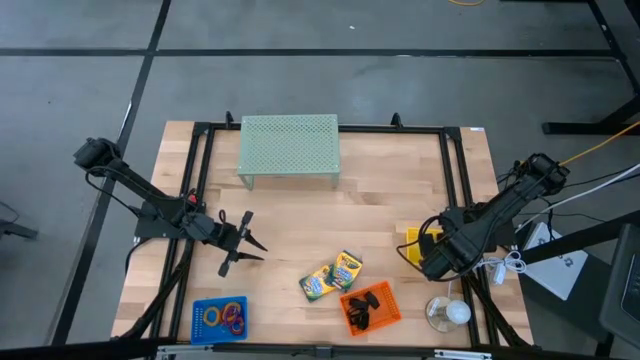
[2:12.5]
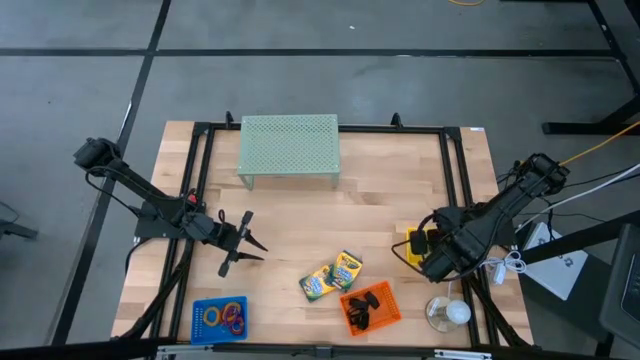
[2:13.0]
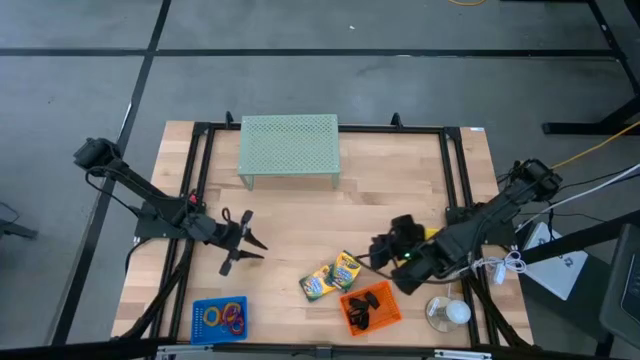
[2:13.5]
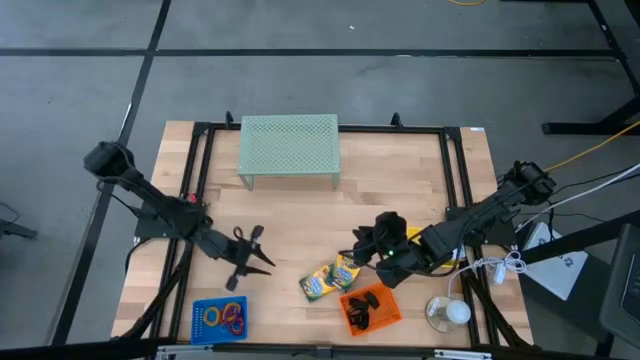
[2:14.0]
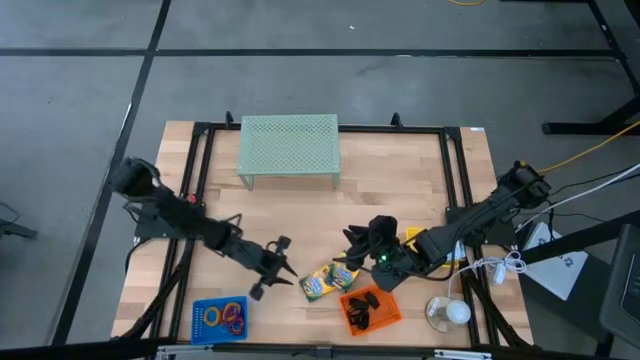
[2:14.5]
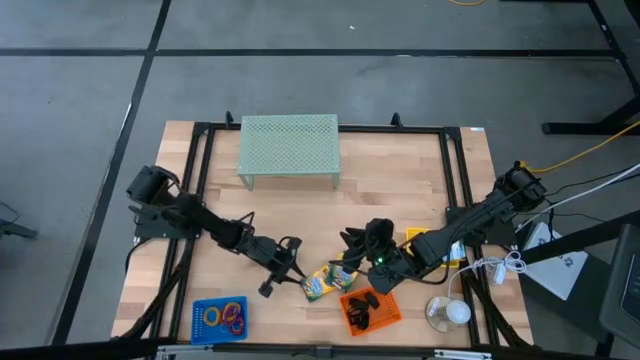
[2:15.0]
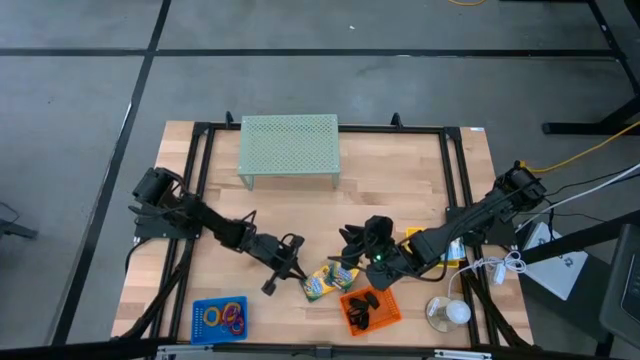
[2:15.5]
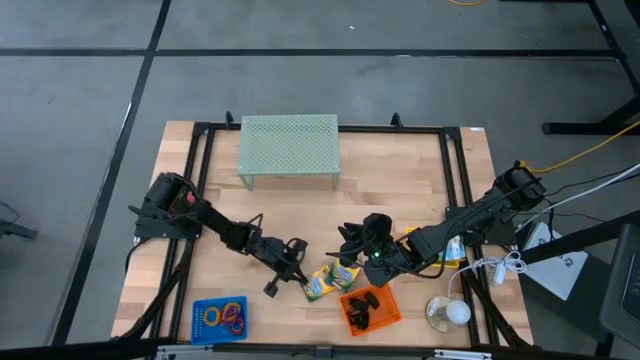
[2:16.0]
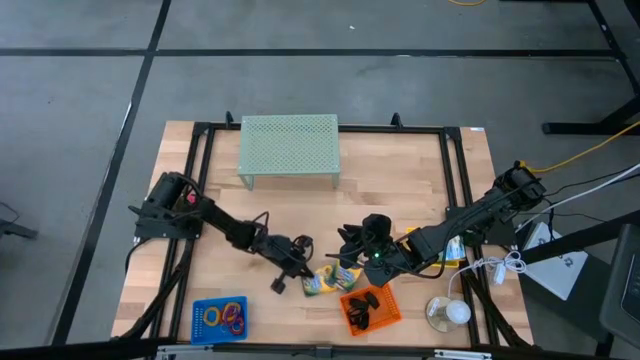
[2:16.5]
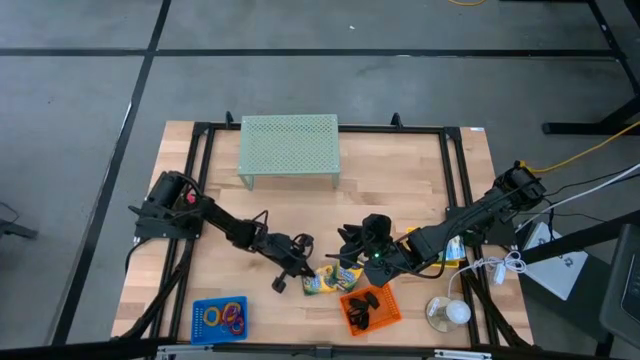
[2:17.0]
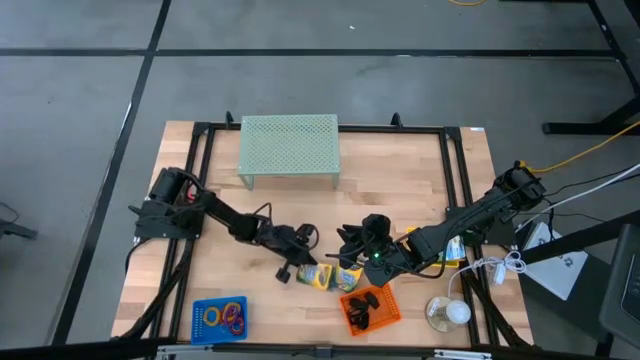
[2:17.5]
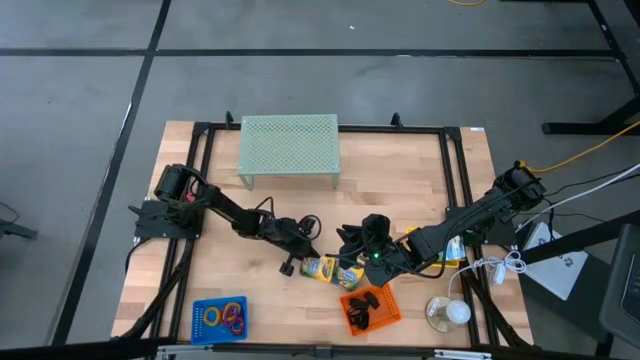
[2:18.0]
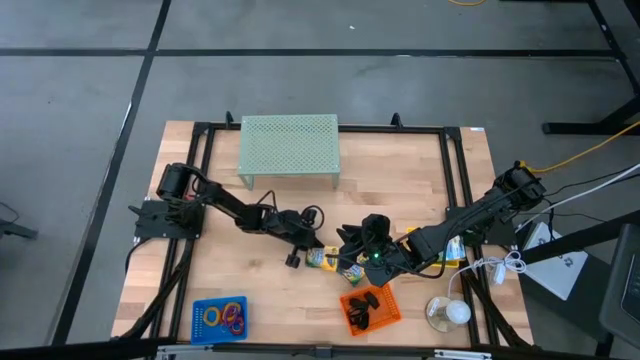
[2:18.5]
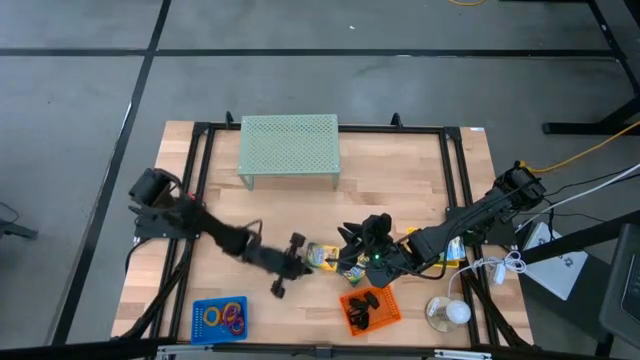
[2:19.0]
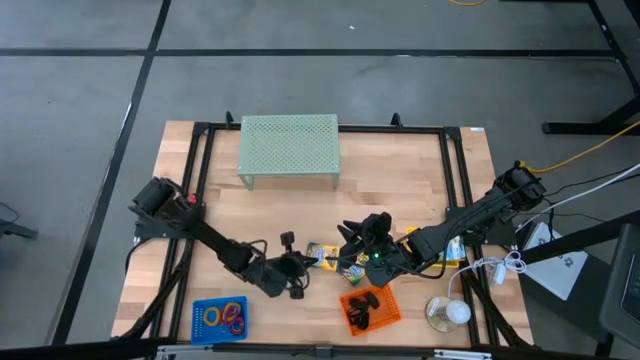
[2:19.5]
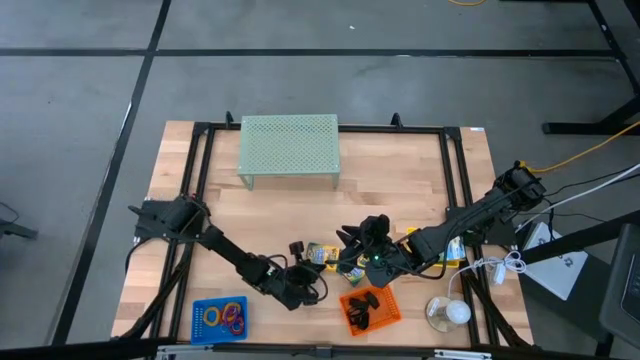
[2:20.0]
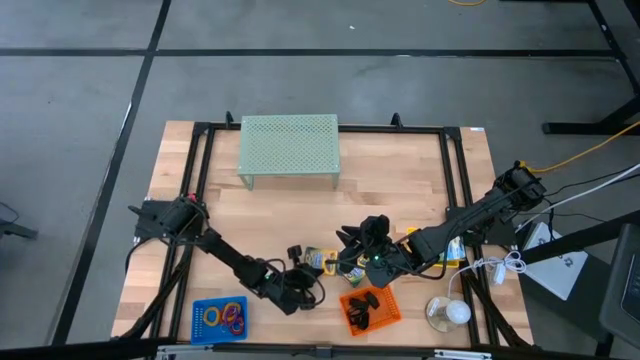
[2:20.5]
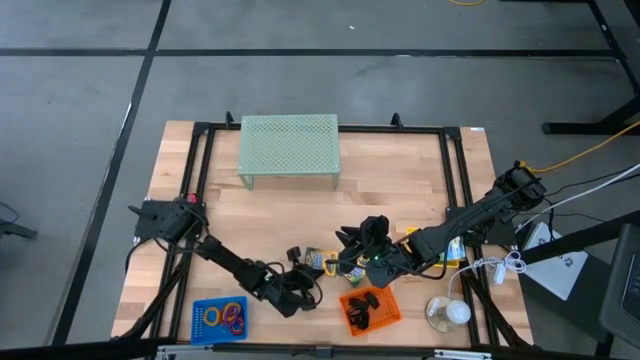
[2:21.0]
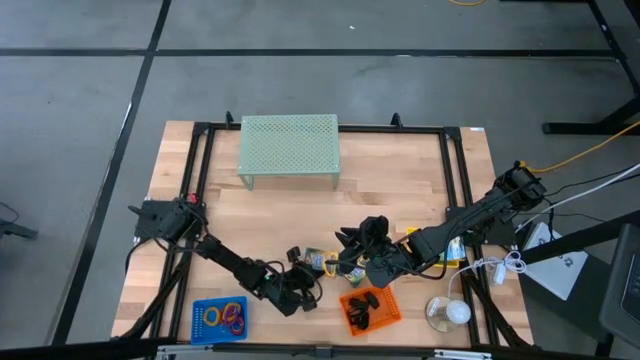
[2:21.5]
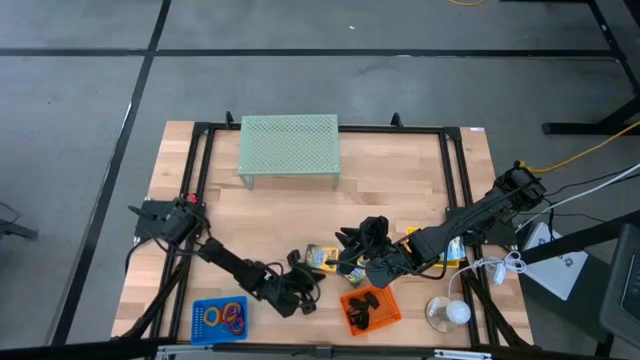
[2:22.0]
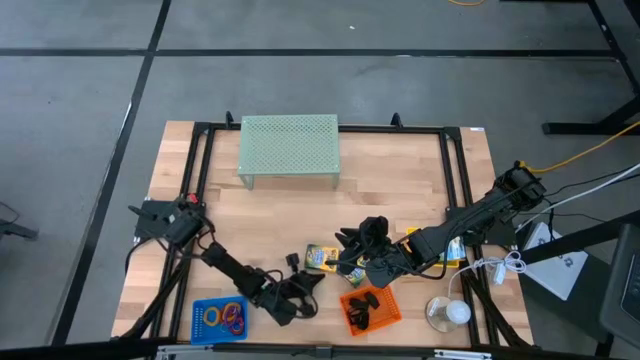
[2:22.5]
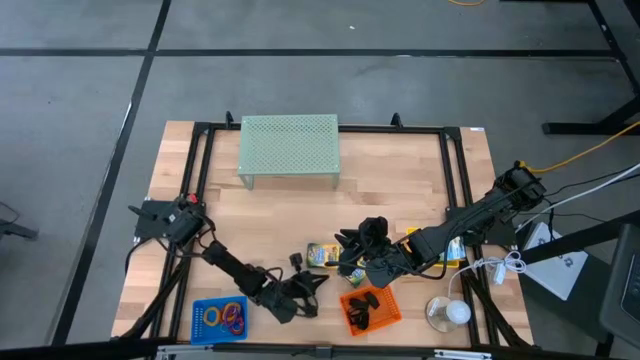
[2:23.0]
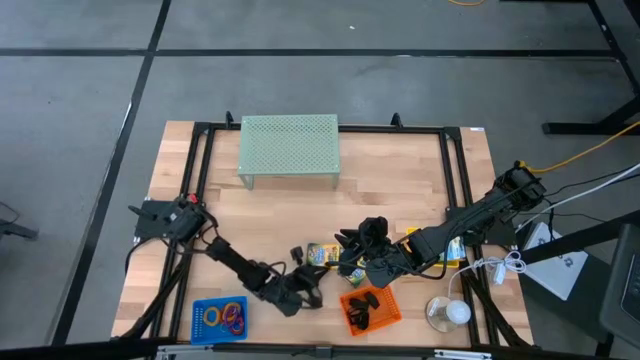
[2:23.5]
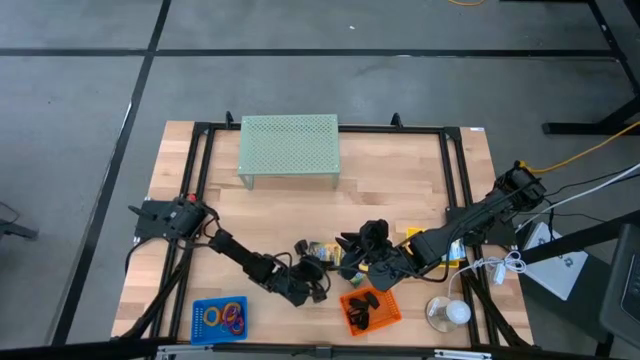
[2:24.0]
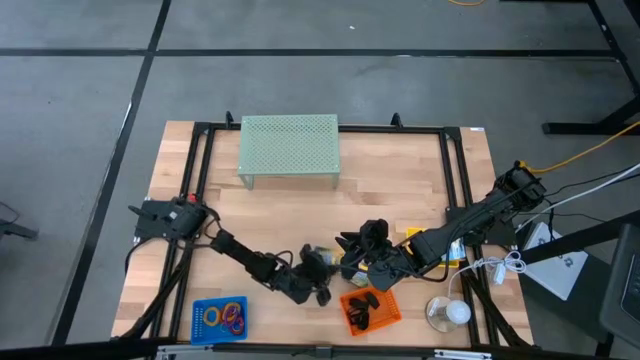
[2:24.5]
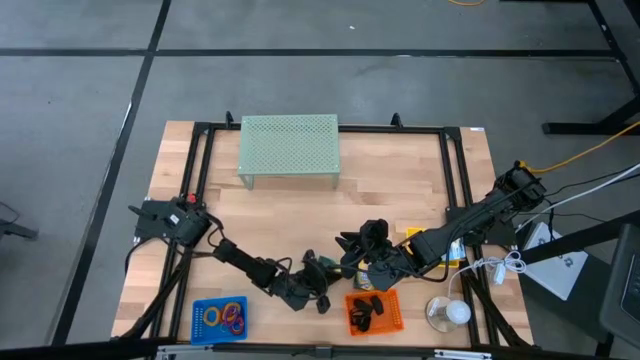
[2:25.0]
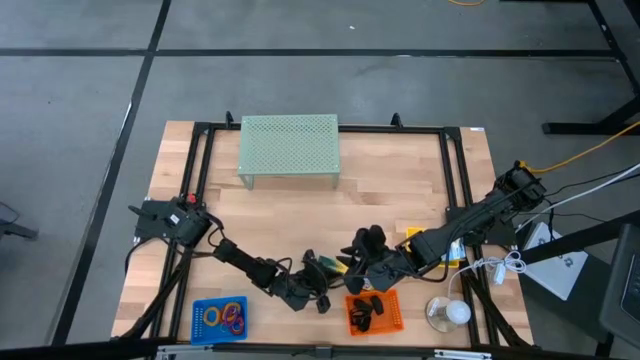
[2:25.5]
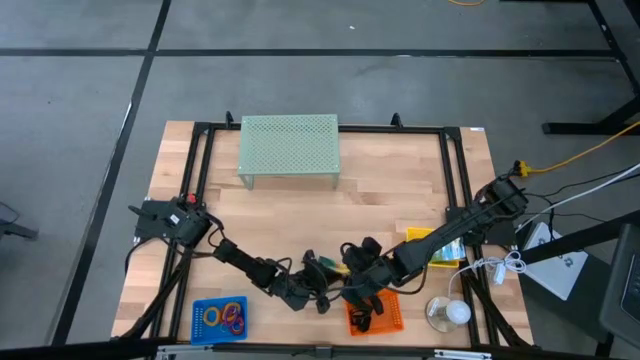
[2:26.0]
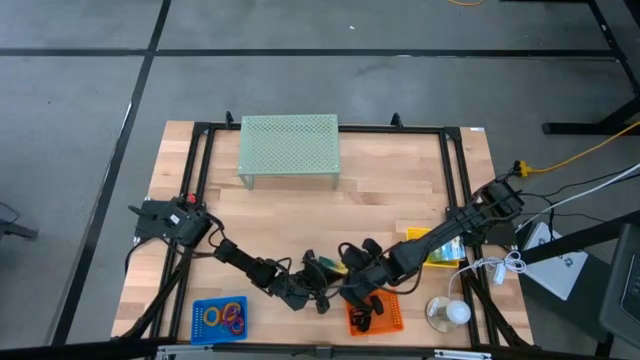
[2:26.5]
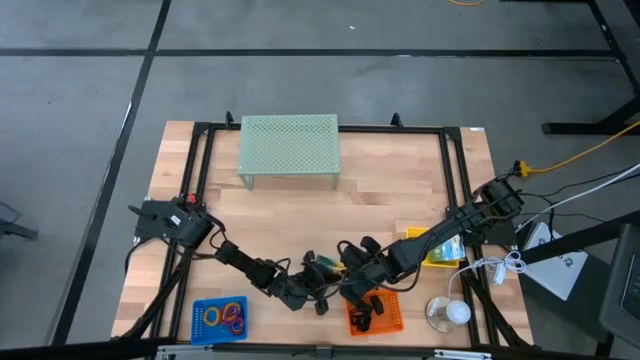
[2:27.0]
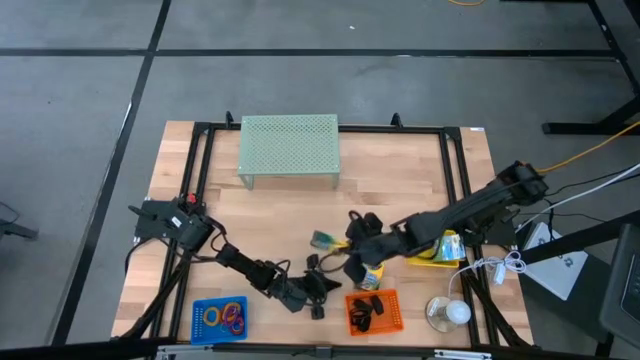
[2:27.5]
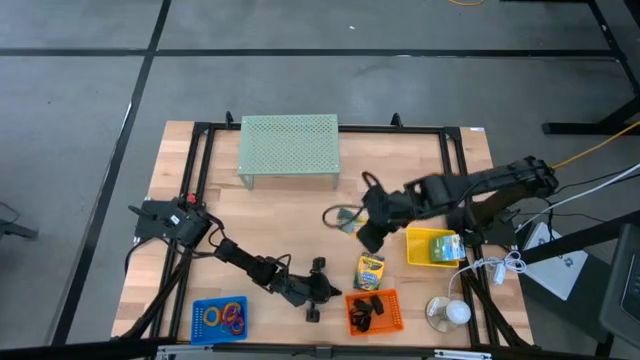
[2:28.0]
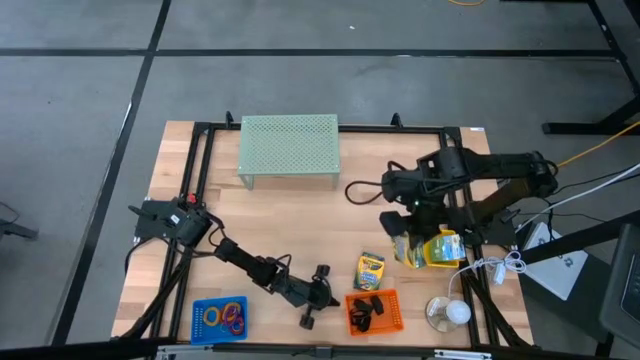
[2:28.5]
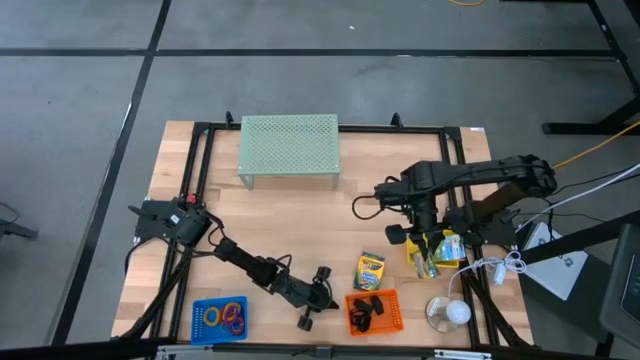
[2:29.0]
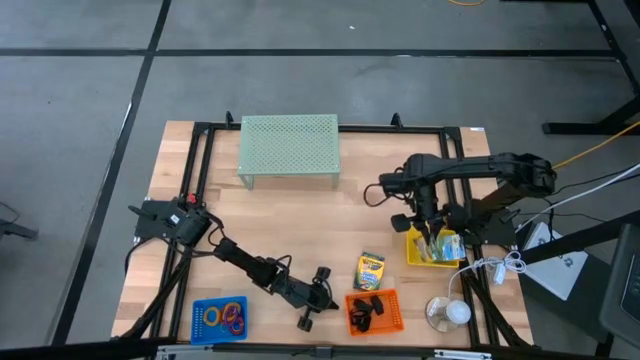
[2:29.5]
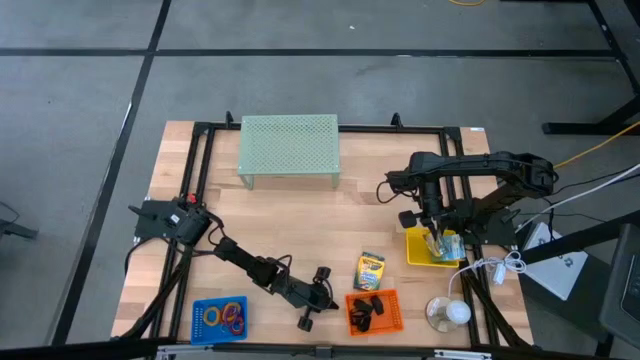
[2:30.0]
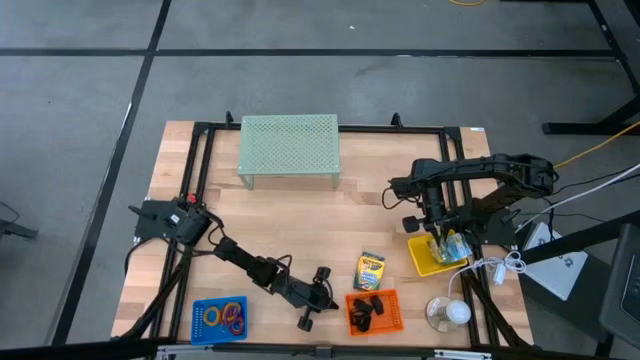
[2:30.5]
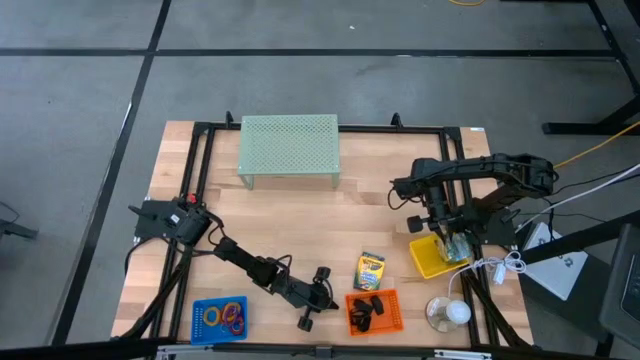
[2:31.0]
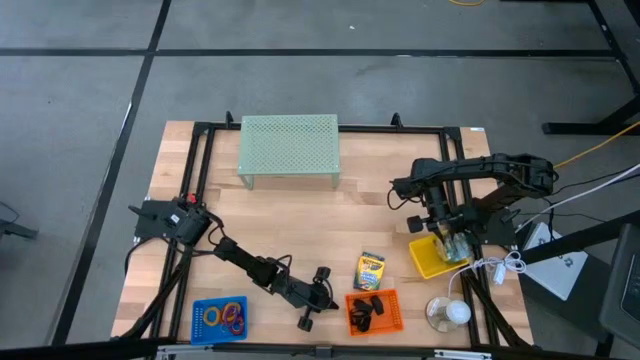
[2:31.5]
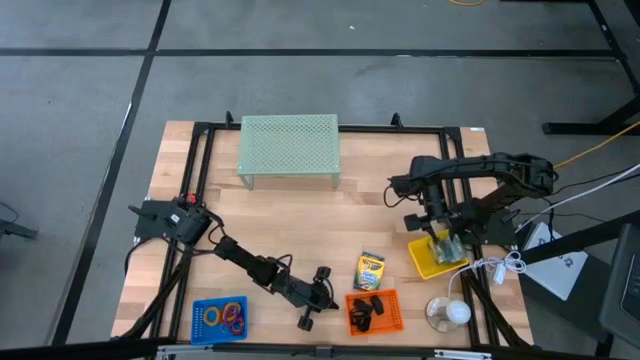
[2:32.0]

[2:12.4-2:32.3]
Task: Pick & Place Office Desk Supplies
Put the box of crayons into the yellow bin

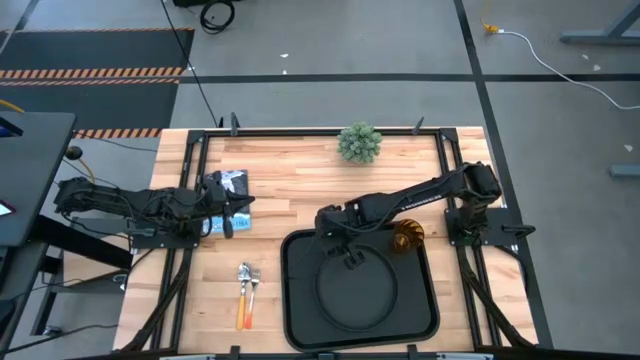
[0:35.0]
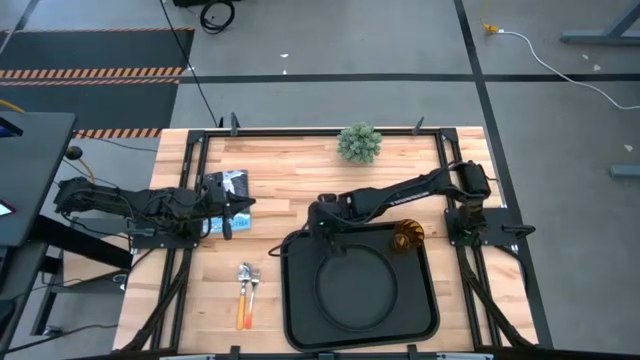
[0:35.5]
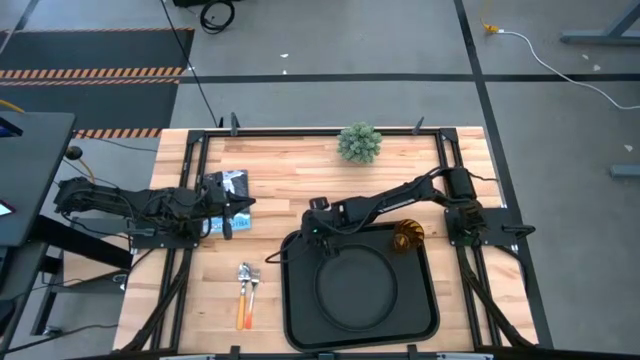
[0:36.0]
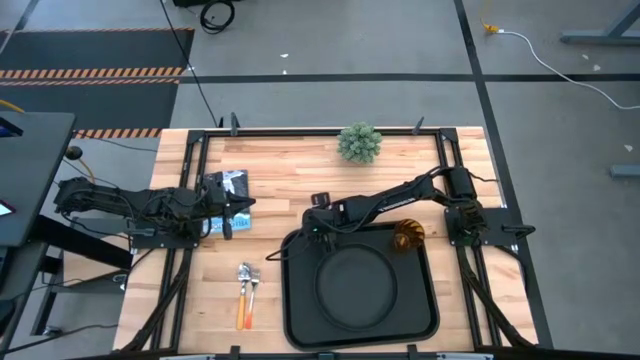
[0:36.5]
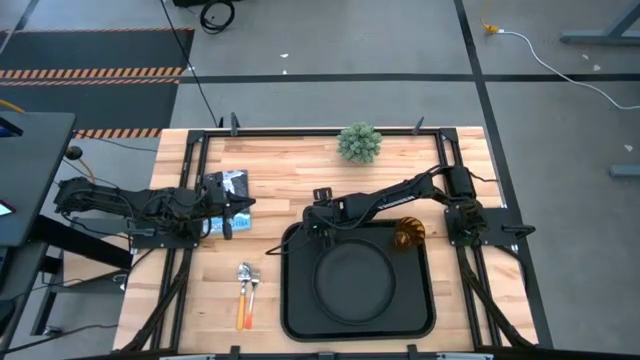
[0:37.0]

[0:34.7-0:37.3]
Task: Pick and place plate/cup/fork/spoon on tray
Adjust the black tray on the black tray
